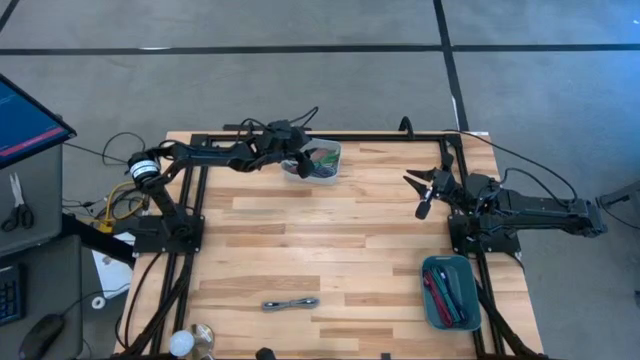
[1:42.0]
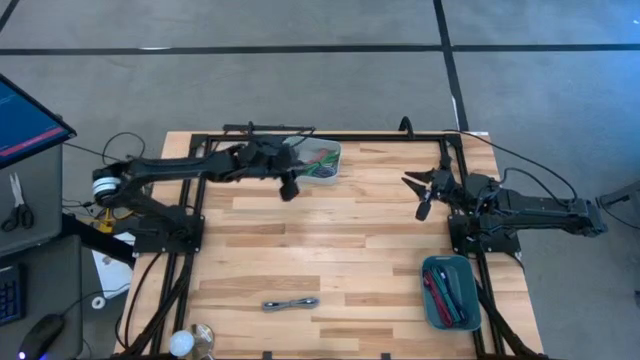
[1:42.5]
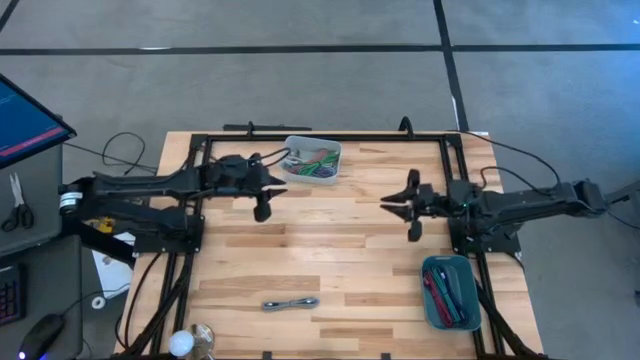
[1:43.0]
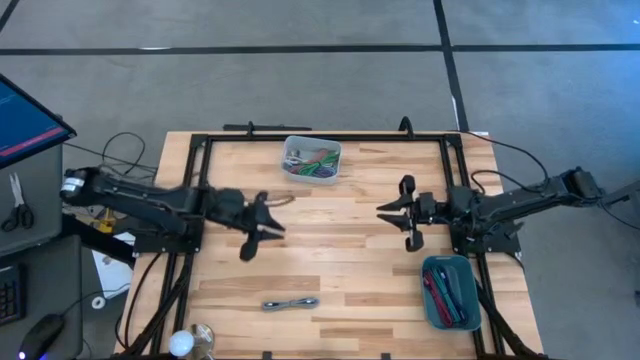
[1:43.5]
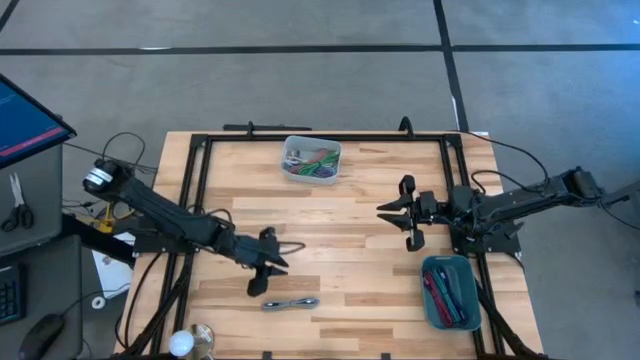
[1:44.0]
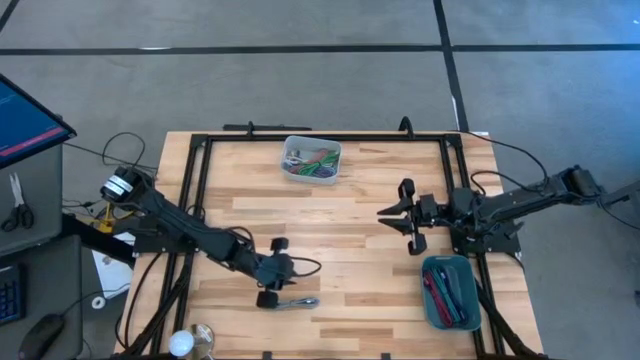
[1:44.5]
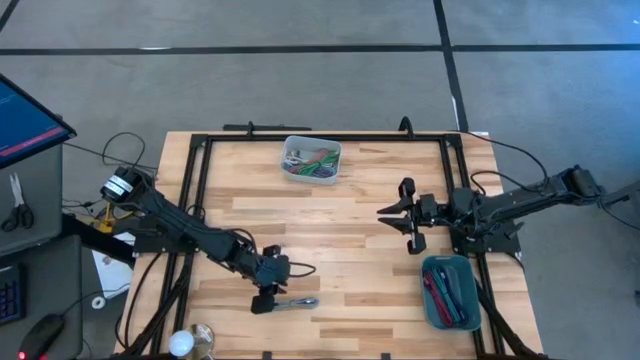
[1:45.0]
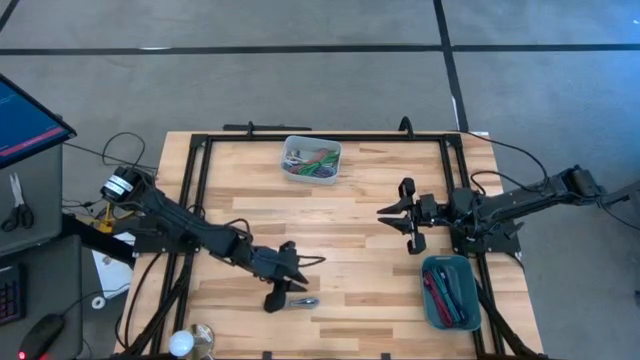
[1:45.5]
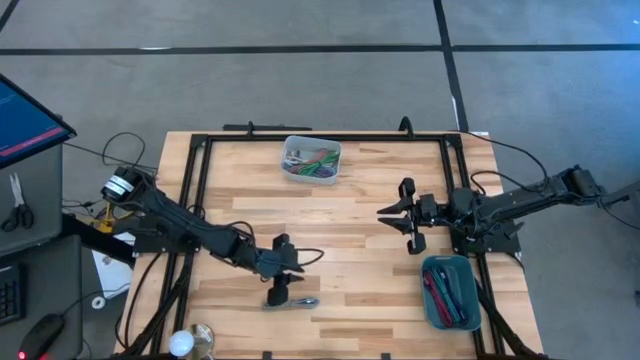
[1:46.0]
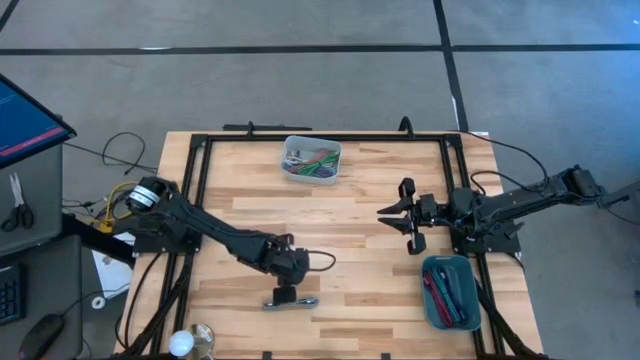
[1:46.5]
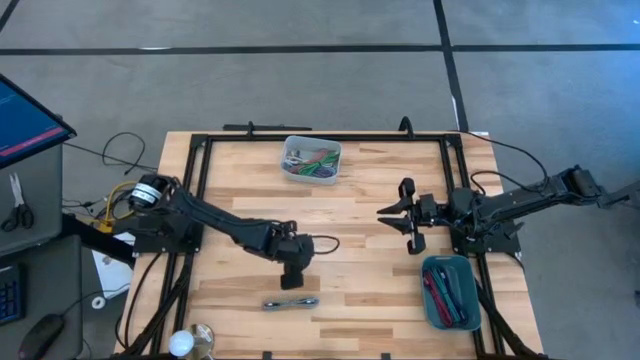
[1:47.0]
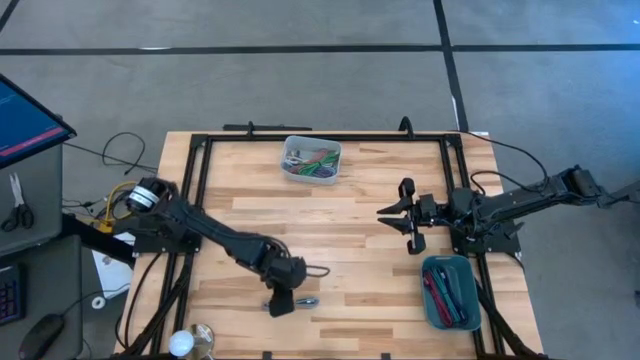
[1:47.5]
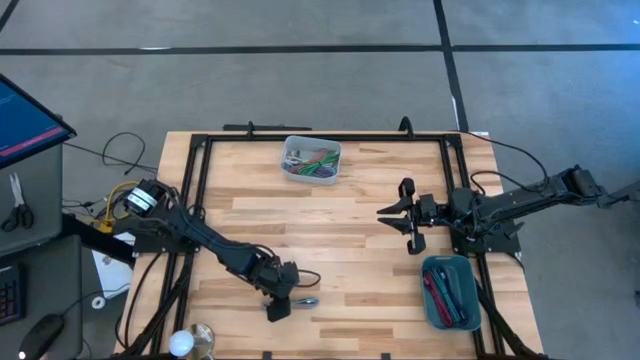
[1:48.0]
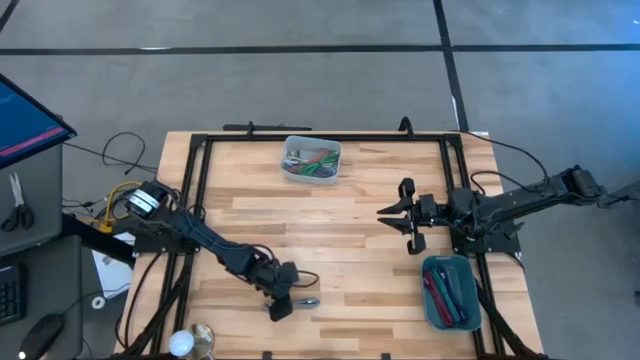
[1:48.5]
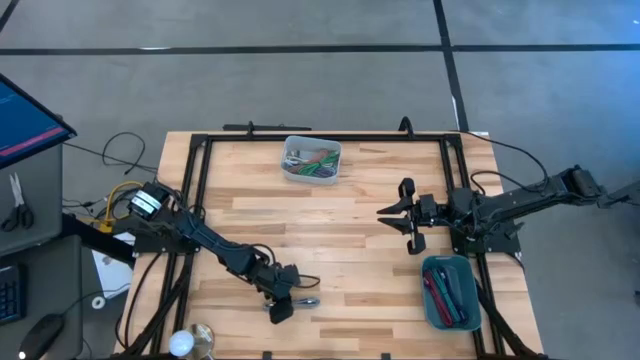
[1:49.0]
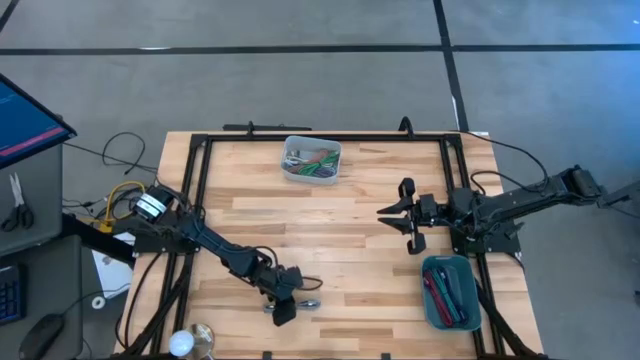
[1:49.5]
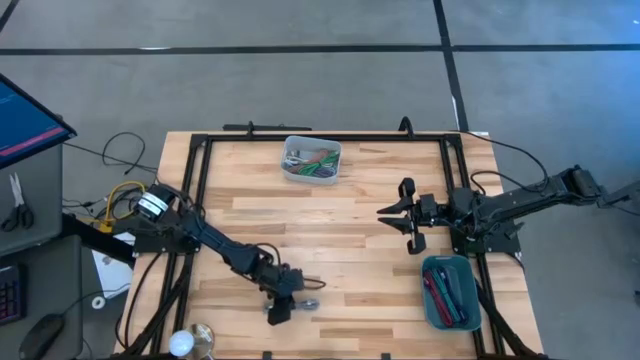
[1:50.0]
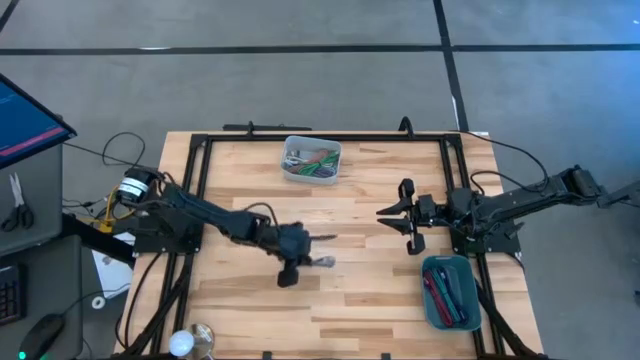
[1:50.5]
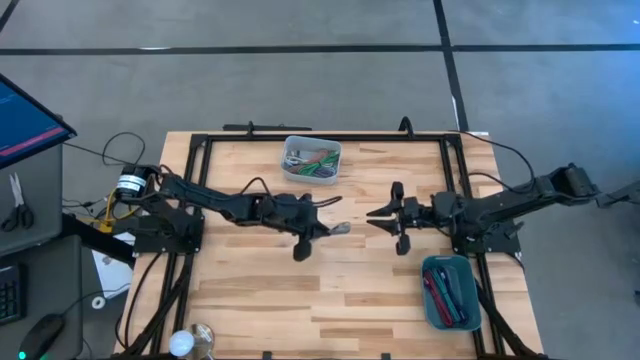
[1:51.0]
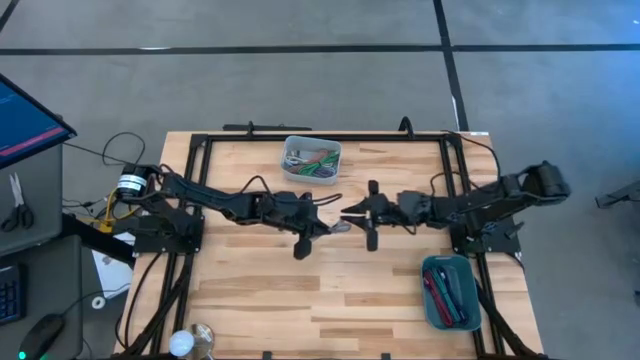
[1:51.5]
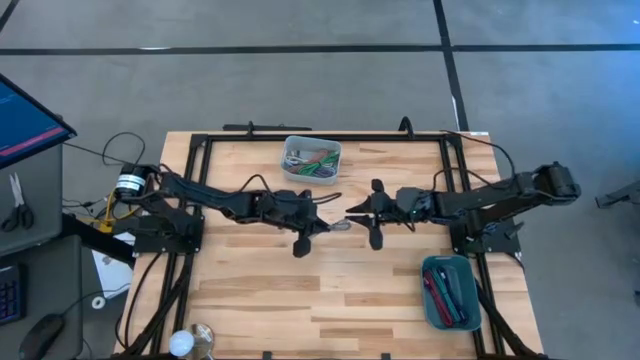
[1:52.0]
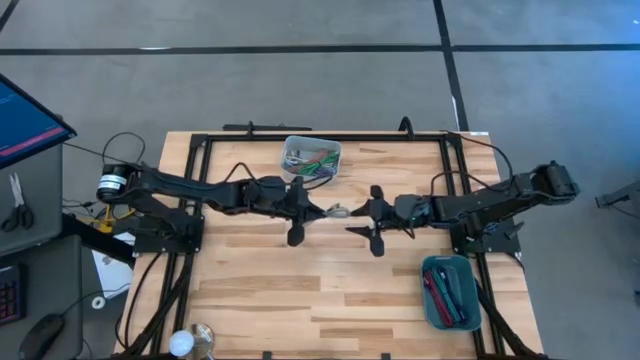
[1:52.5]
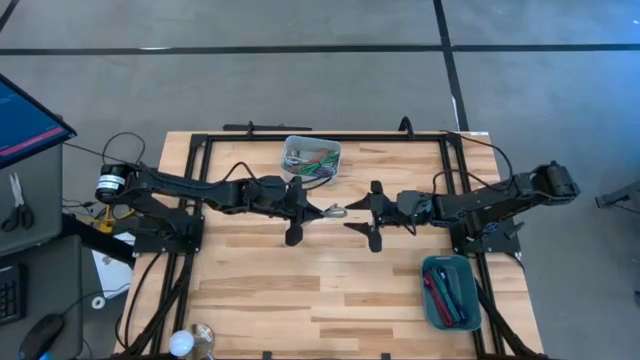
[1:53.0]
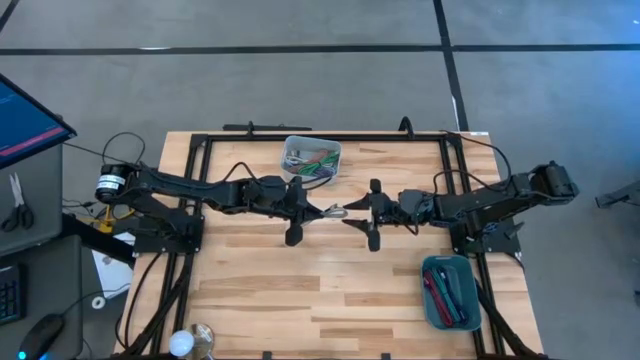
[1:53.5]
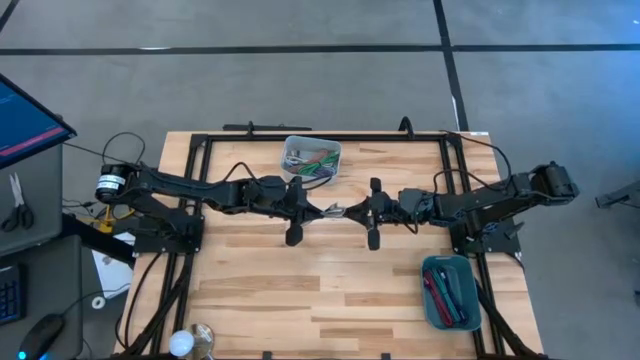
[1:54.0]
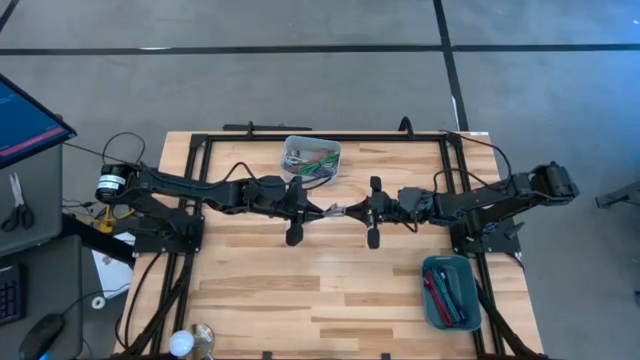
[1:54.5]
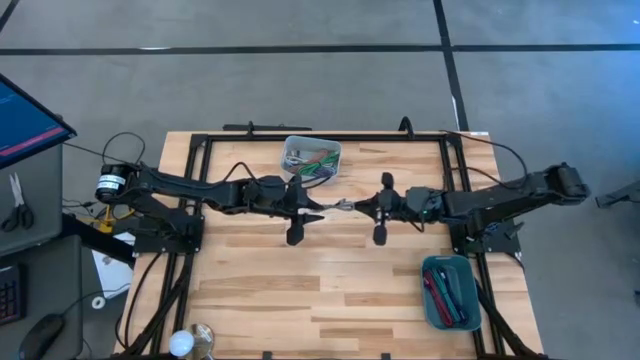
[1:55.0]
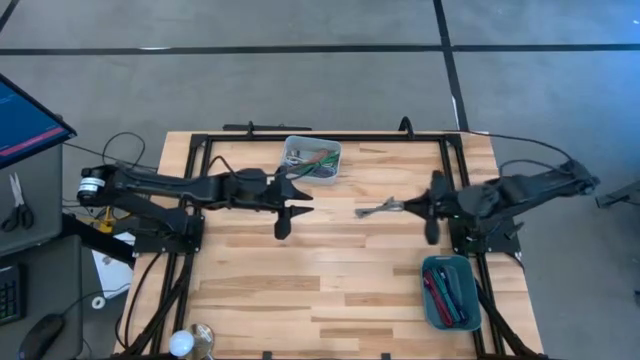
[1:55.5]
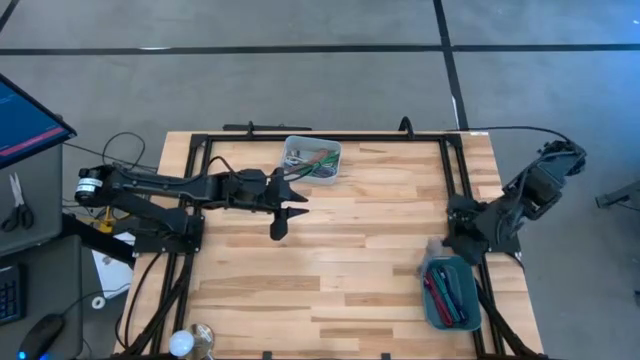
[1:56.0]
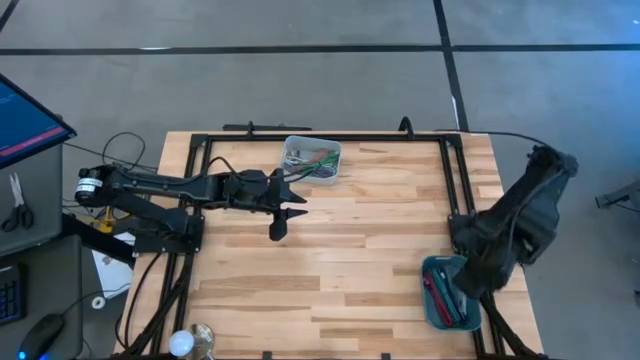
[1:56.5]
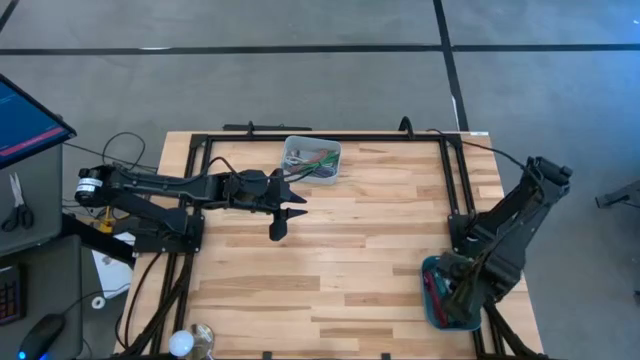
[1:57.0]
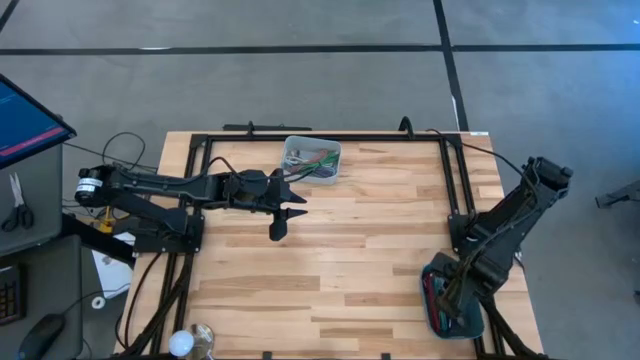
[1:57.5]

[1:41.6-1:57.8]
Task: Pick & Place USB Port
Put the white patterned charger cable into the blue bin

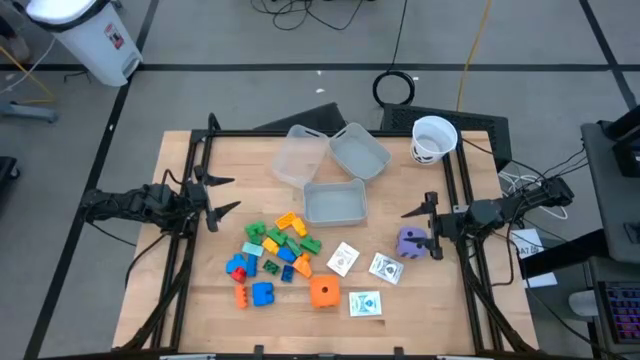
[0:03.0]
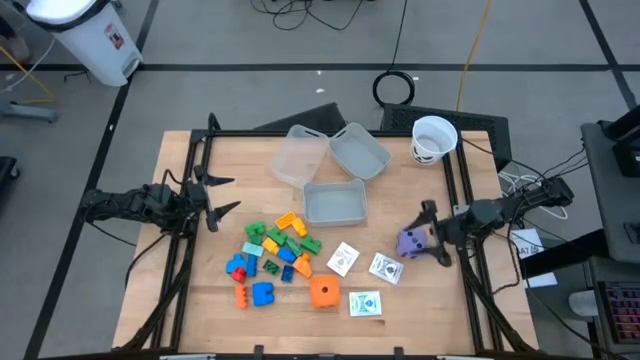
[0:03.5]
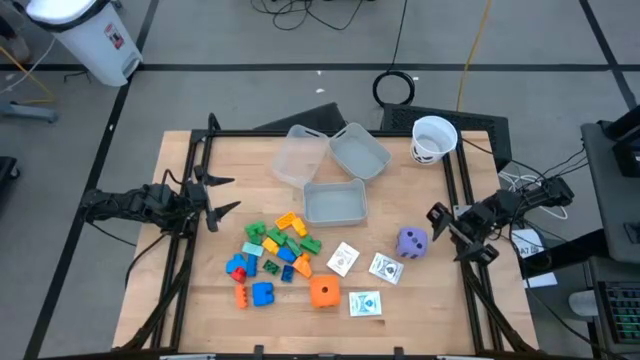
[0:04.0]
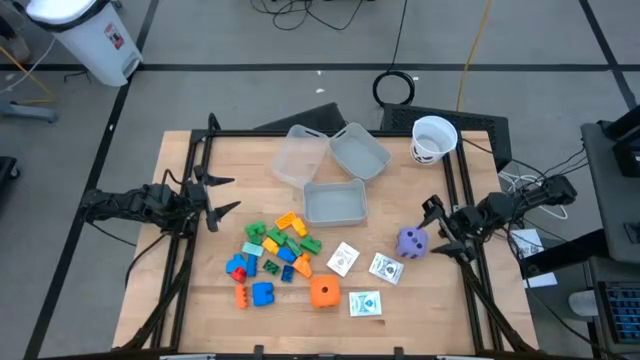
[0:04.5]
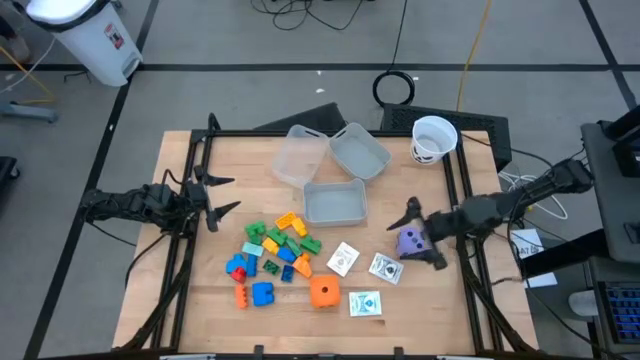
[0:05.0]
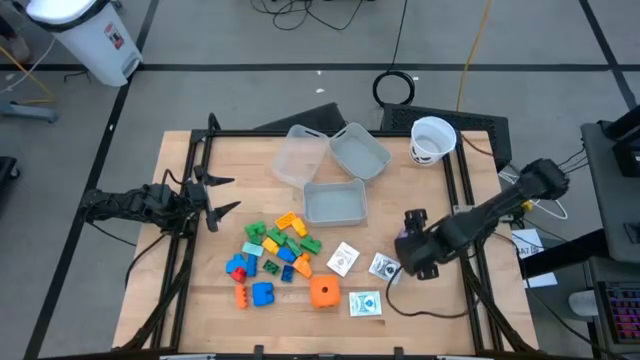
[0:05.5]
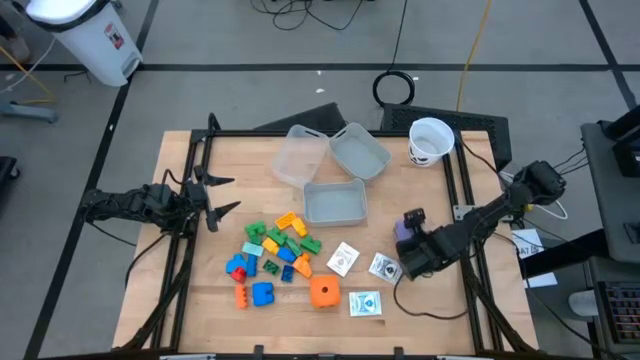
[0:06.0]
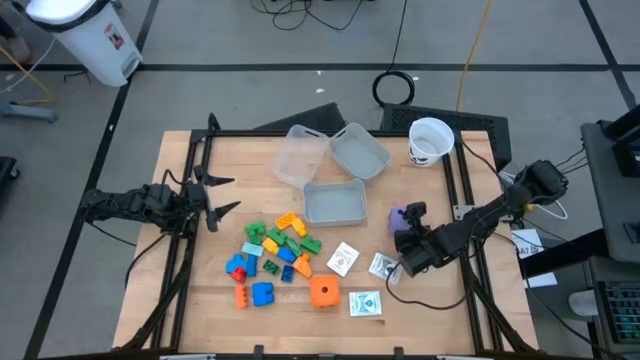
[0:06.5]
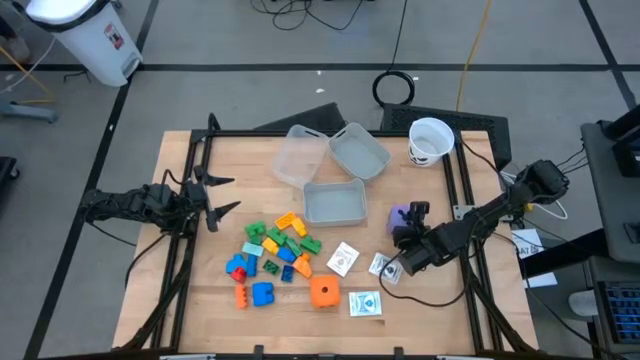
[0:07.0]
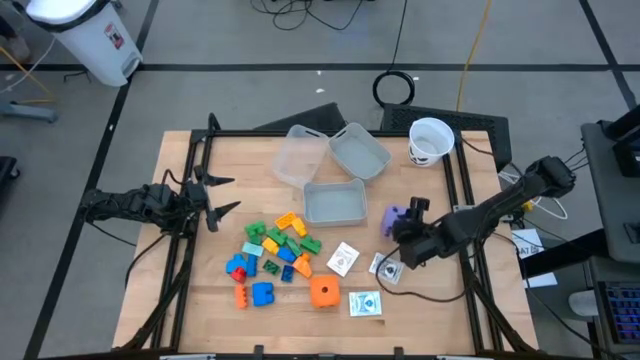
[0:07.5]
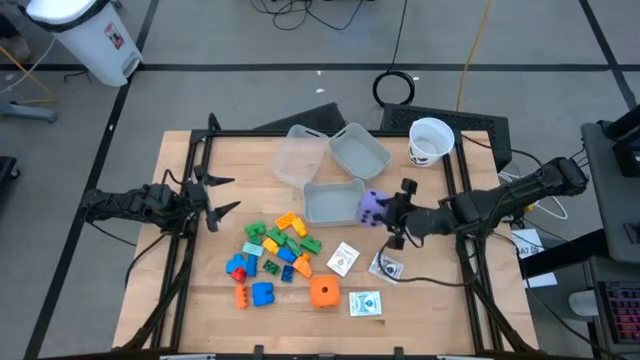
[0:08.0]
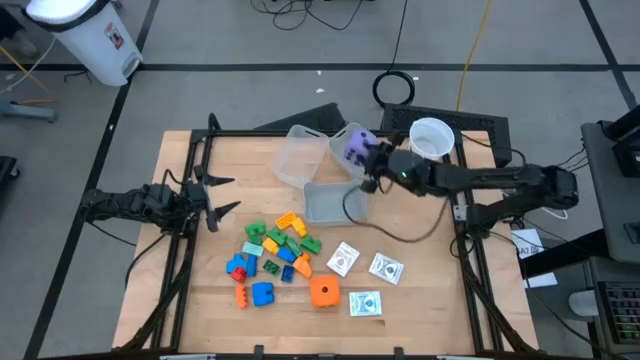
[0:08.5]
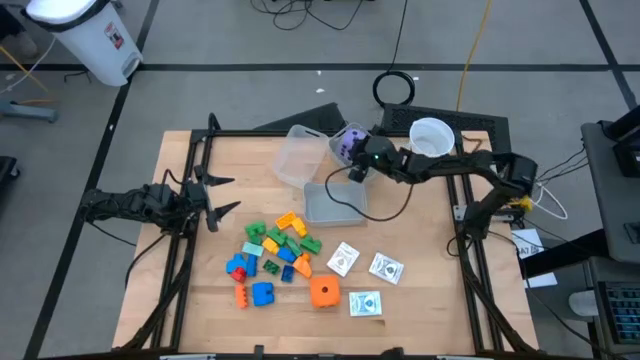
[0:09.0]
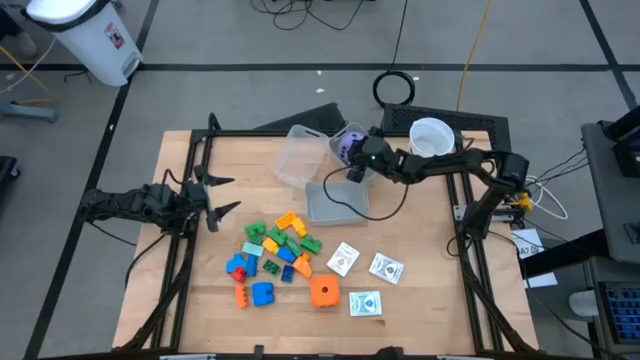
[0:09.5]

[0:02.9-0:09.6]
Task: Pick & Place Toys
Put the violet die into the top gray bin
